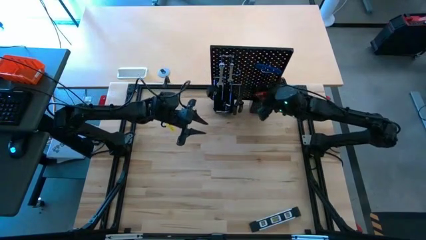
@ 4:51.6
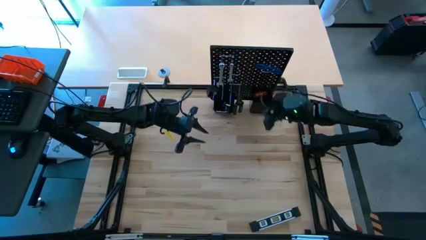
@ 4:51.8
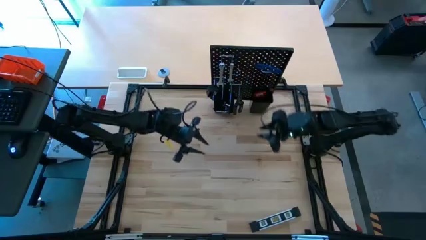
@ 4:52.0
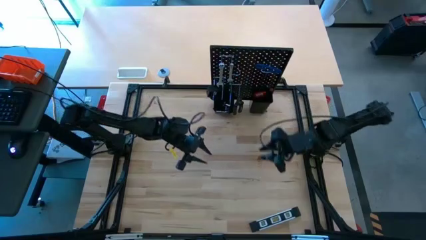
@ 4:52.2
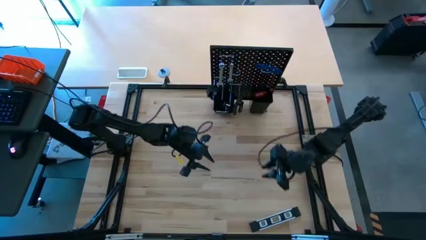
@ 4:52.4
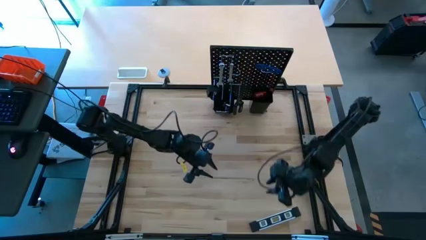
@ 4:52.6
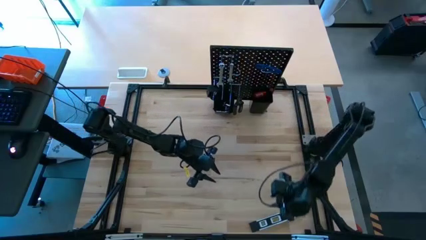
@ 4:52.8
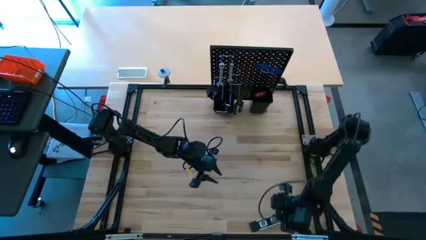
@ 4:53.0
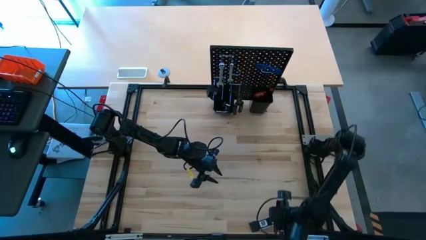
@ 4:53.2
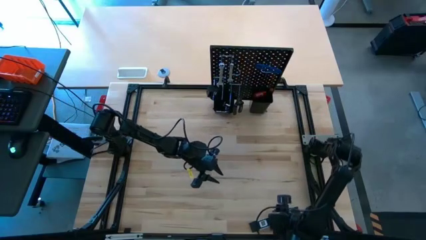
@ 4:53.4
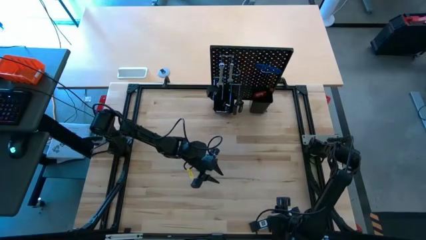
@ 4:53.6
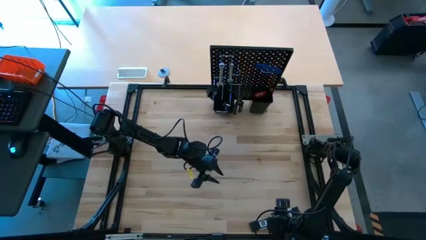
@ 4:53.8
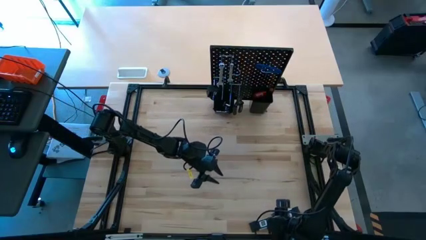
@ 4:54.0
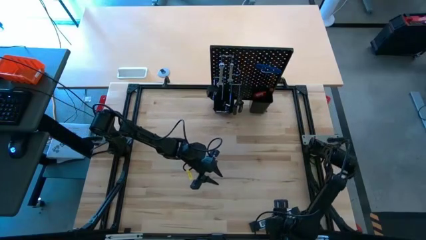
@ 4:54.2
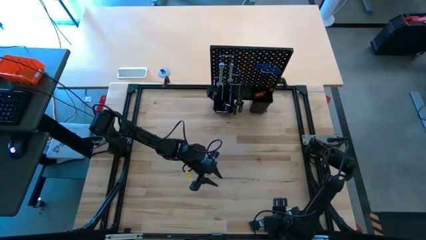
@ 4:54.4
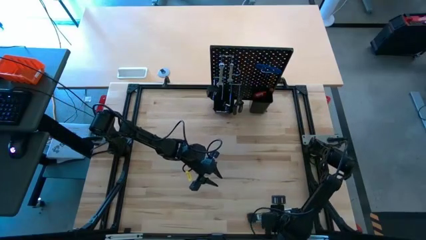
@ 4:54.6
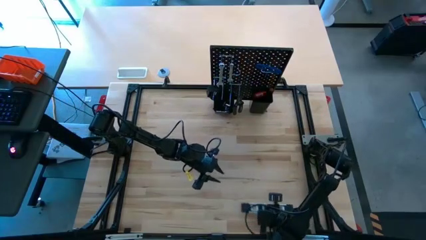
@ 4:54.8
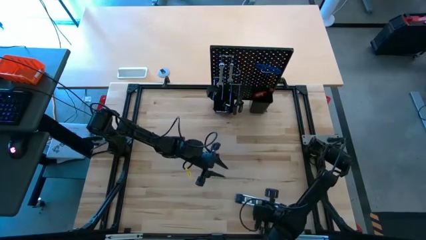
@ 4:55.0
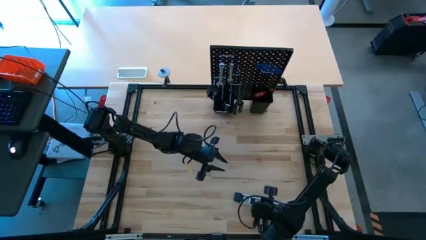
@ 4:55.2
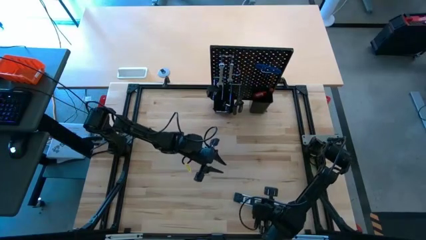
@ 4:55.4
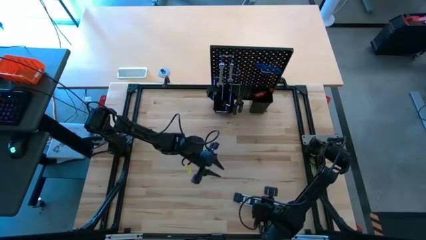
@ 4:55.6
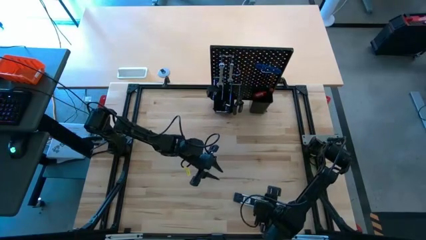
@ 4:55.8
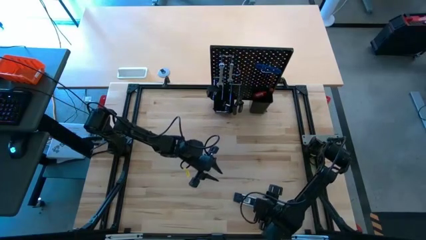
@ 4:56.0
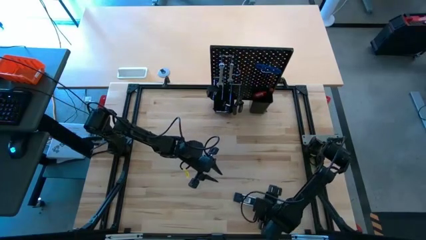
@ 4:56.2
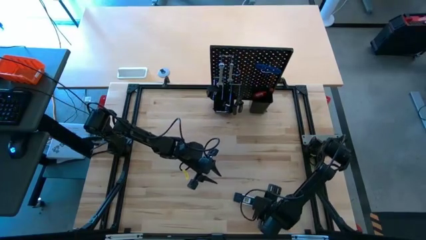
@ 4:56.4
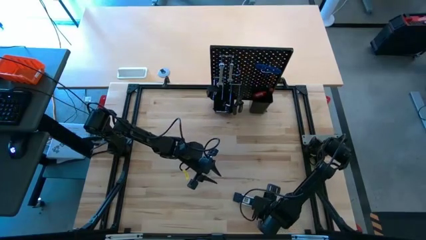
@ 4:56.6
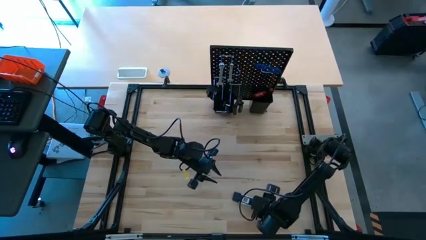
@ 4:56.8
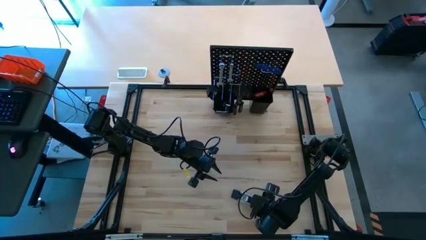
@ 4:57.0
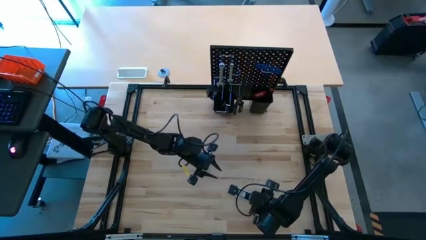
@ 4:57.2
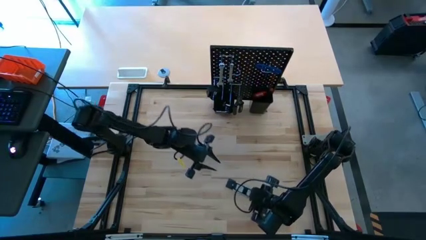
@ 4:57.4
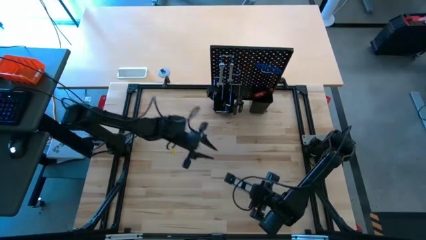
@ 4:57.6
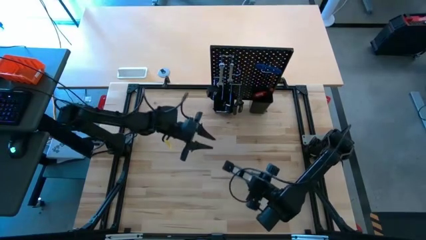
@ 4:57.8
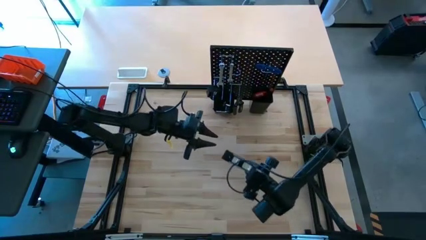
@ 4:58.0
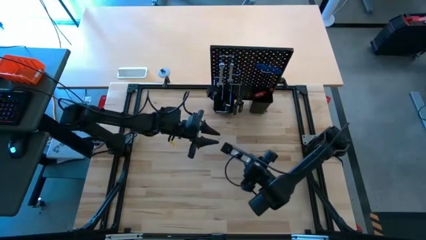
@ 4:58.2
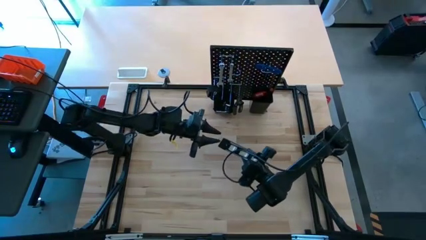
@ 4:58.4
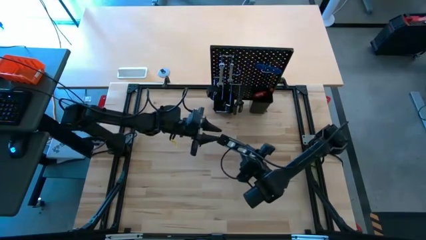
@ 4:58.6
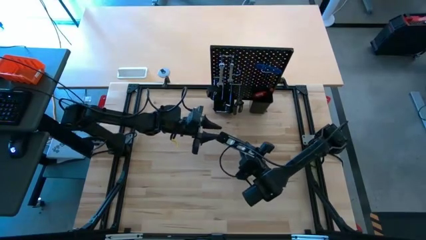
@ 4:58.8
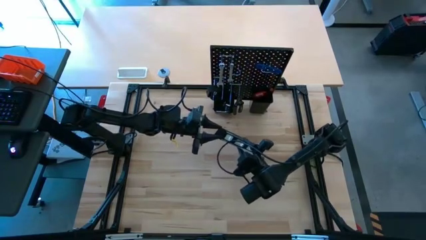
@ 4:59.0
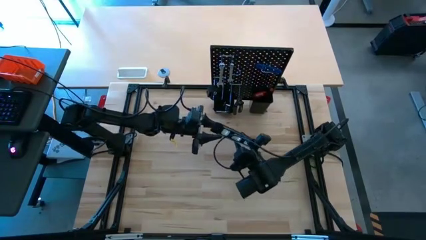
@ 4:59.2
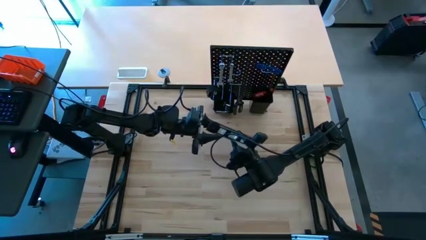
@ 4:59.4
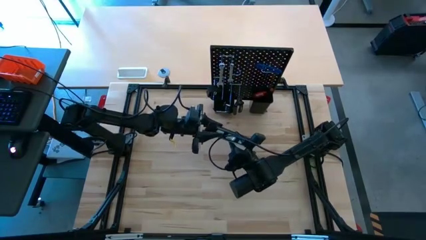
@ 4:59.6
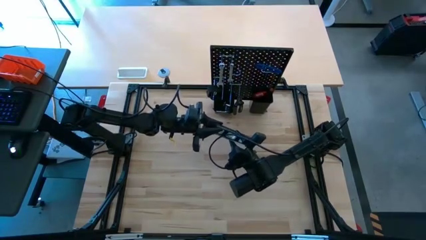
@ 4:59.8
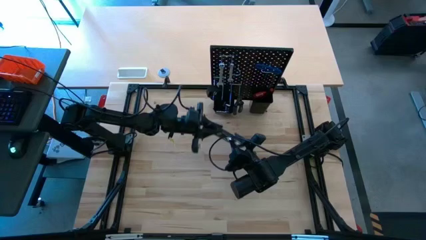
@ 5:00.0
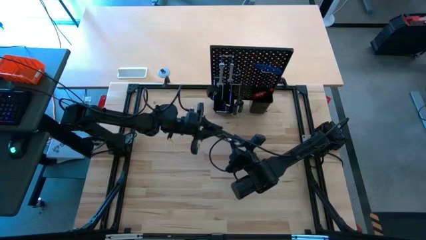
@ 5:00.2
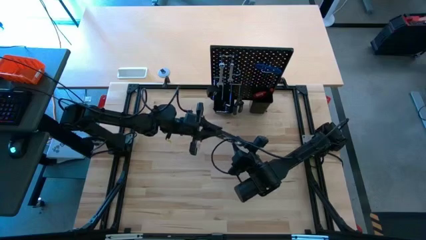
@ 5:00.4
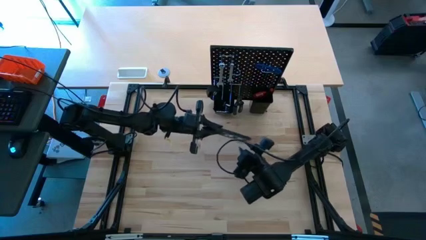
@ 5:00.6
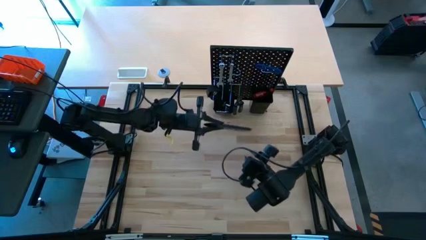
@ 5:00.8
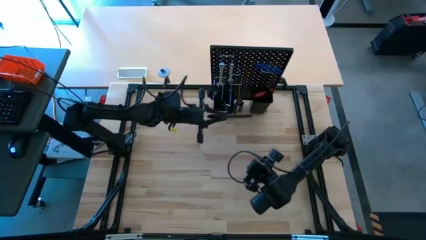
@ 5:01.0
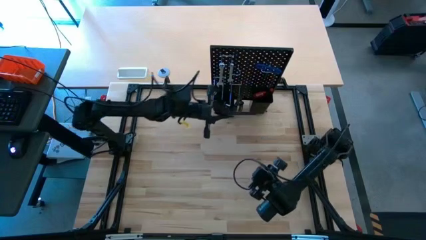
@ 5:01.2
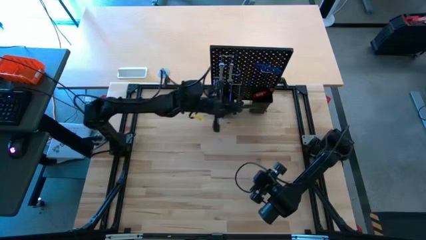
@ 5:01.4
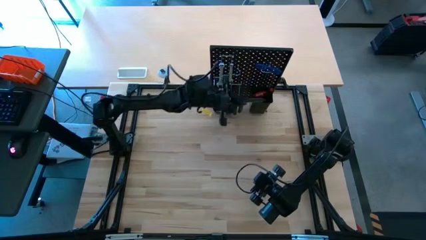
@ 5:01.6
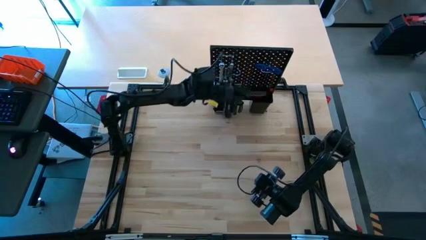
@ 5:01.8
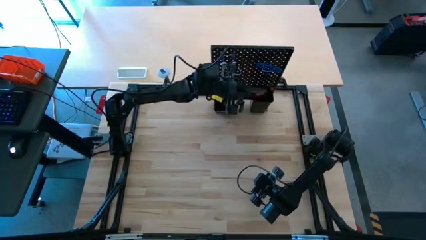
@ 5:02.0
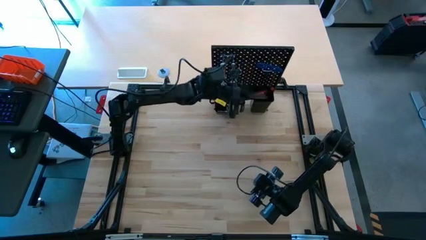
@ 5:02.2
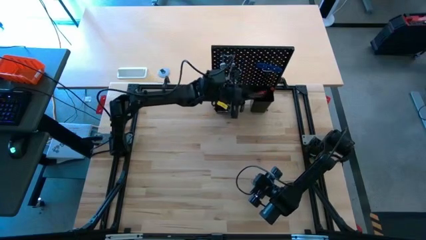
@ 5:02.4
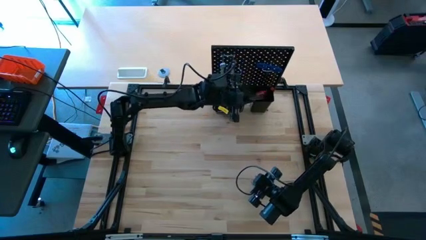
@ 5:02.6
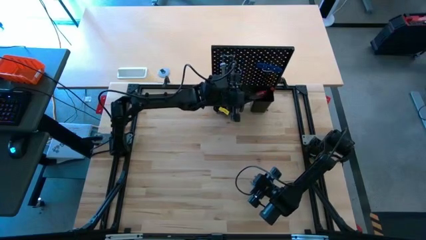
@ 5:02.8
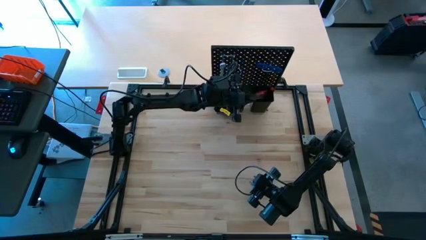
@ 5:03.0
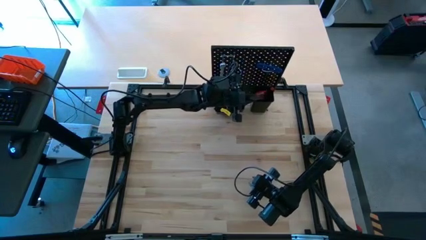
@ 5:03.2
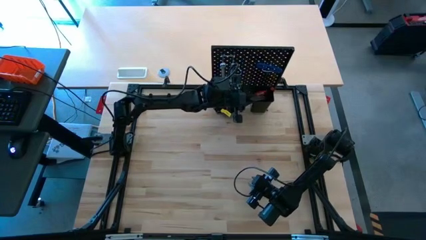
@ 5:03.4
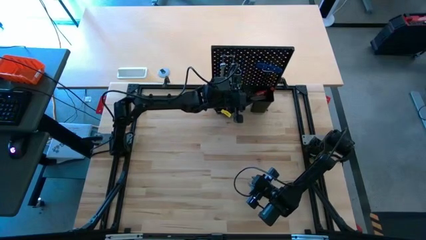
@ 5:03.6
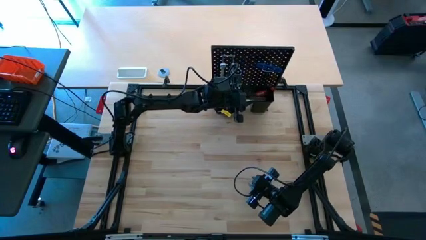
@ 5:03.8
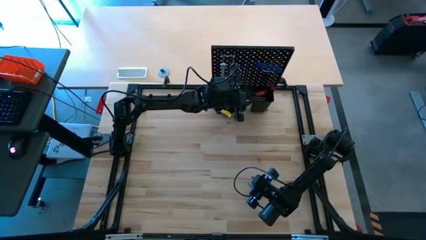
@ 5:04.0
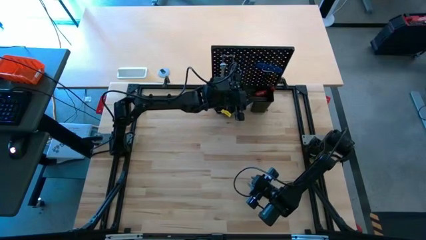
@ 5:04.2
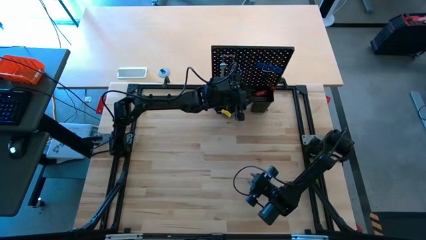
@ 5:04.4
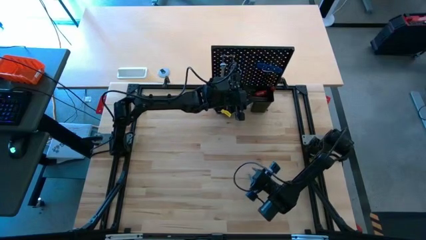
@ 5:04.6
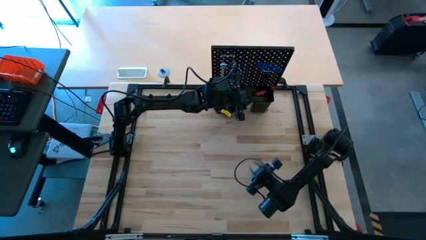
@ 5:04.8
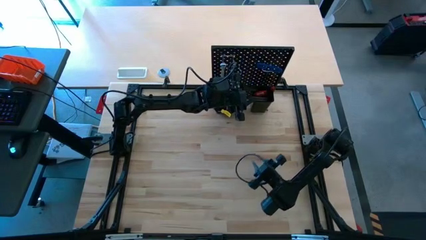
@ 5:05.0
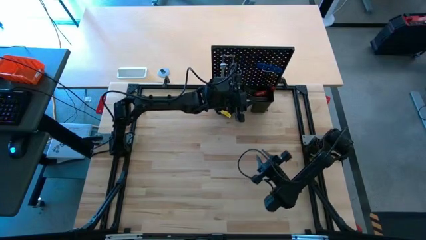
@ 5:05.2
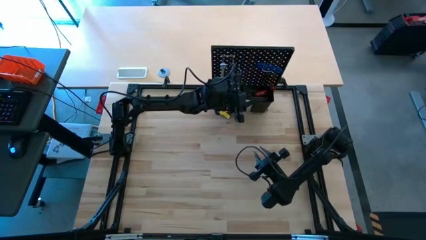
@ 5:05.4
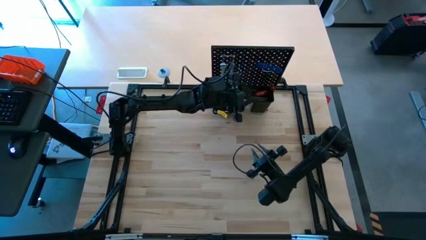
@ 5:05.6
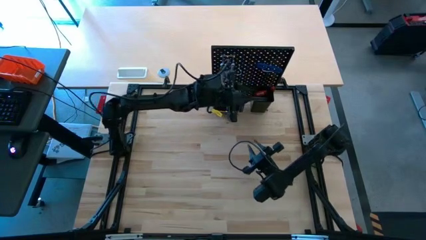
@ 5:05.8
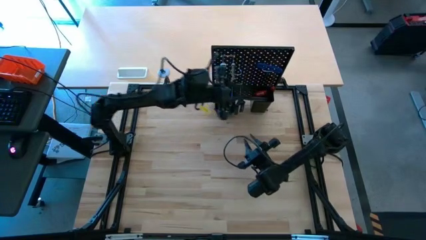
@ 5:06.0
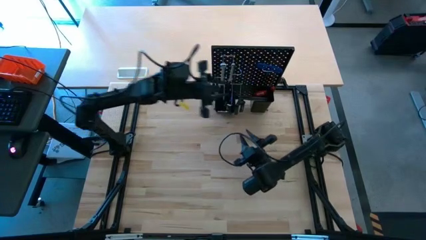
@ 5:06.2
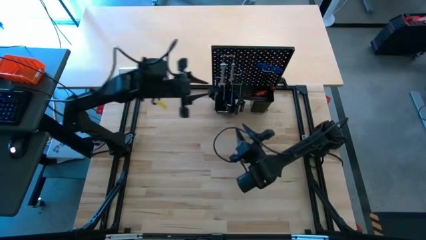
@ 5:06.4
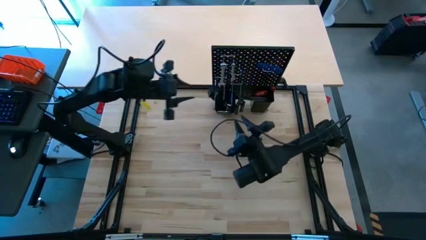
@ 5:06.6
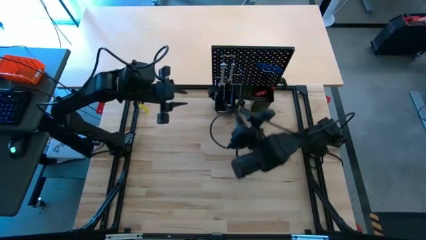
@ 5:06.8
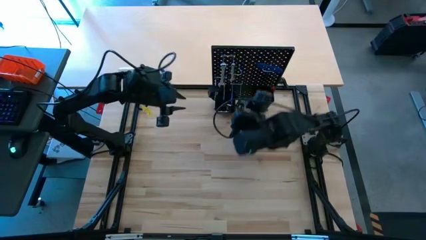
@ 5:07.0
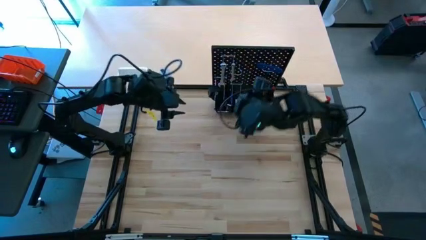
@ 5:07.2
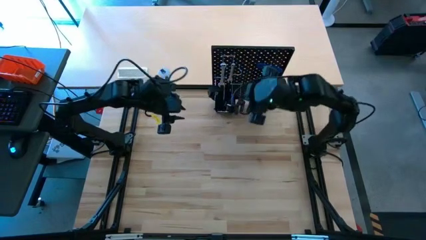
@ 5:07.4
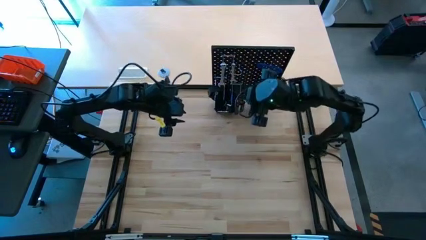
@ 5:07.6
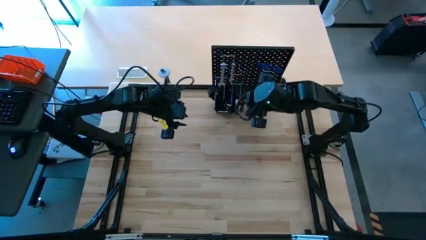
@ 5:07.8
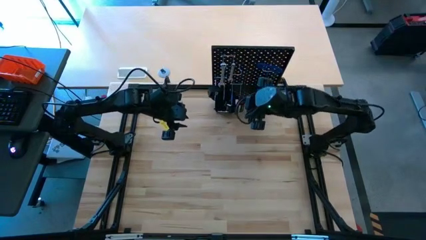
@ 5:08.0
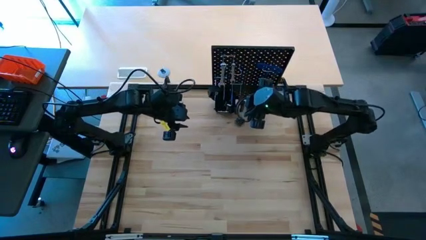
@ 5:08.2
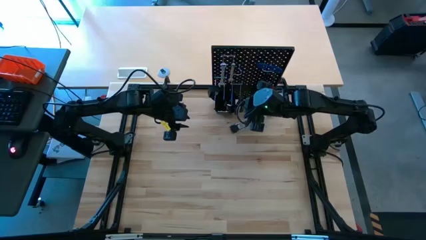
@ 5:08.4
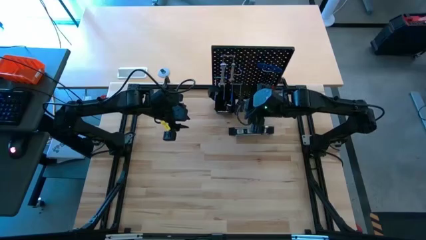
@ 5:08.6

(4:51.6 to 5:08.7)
Task: Hang tools onto peg board
Put the Spirit level into the right bin on the pegboard
